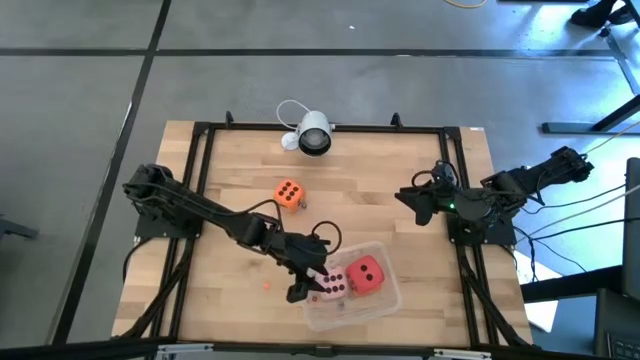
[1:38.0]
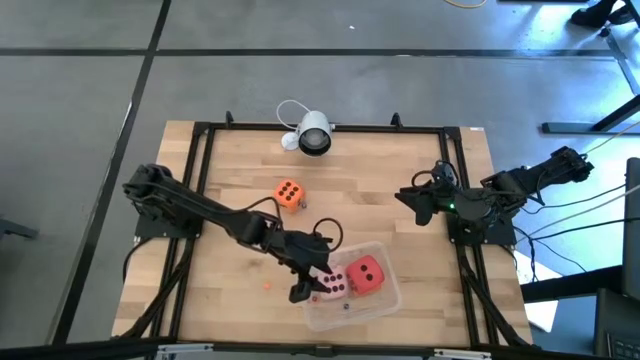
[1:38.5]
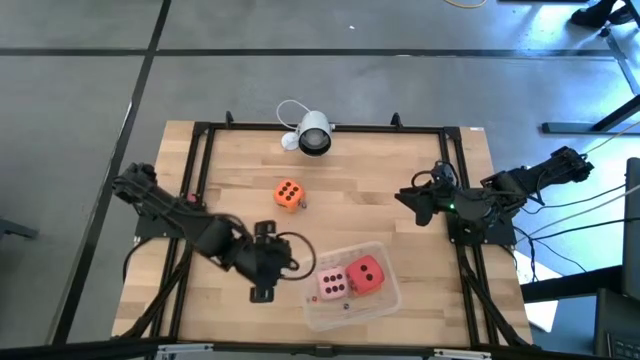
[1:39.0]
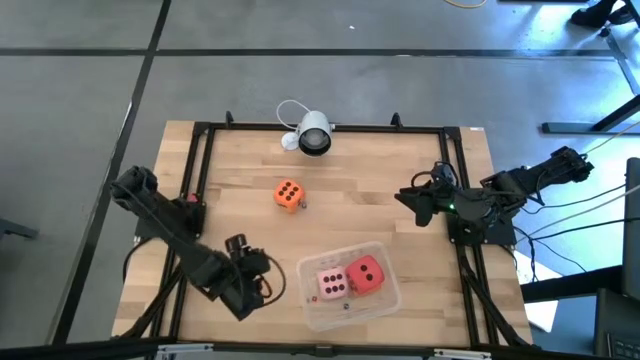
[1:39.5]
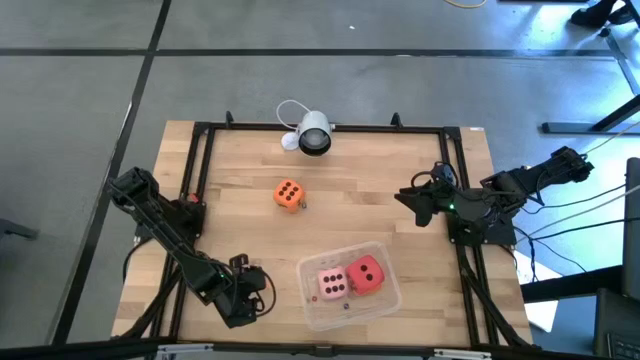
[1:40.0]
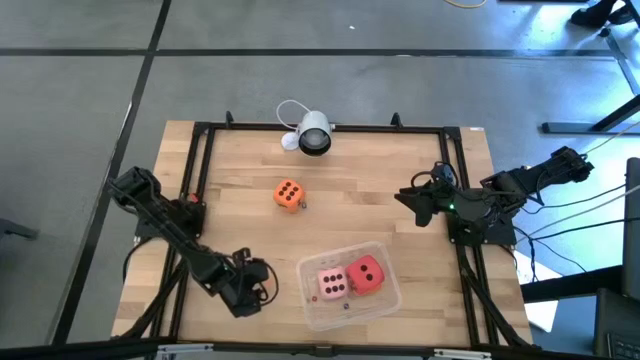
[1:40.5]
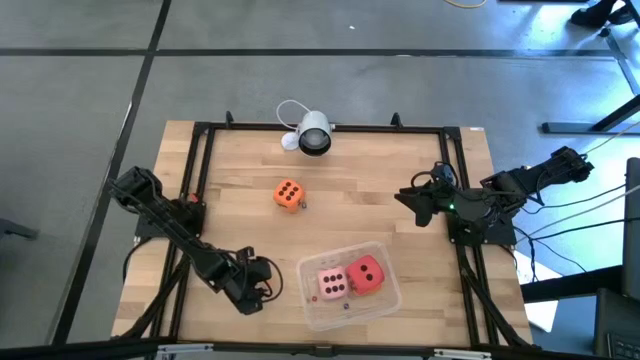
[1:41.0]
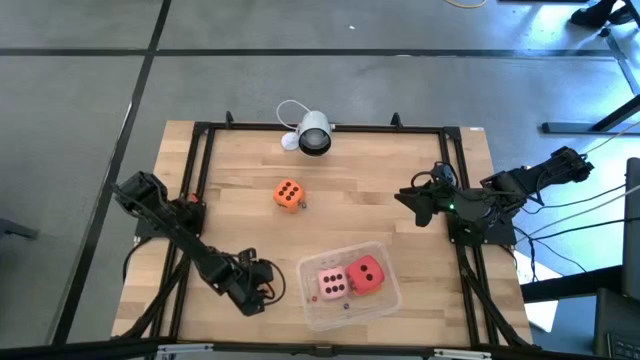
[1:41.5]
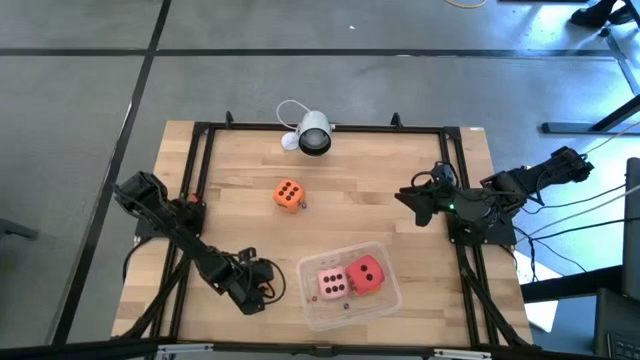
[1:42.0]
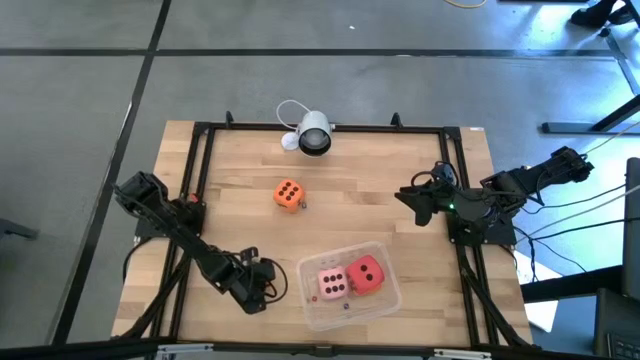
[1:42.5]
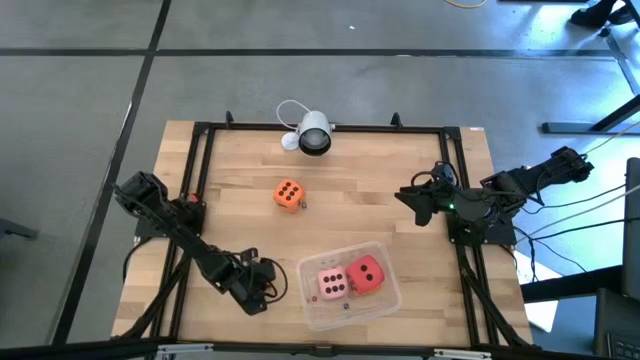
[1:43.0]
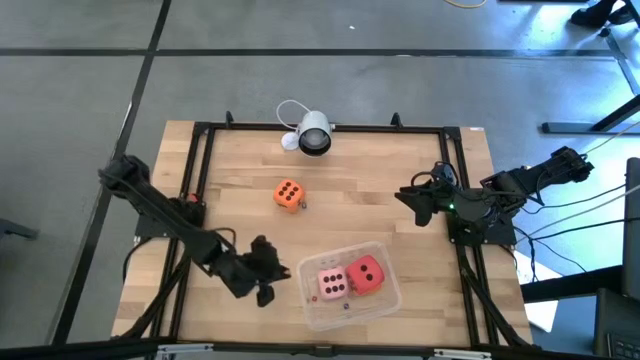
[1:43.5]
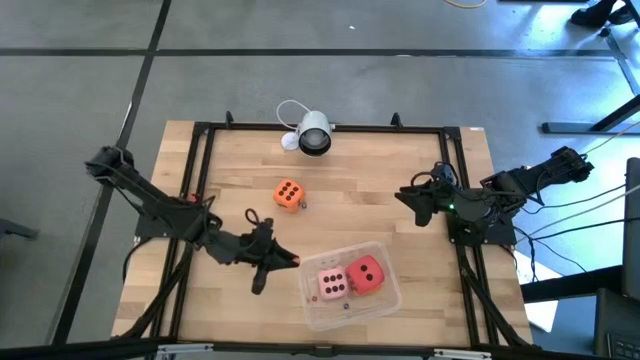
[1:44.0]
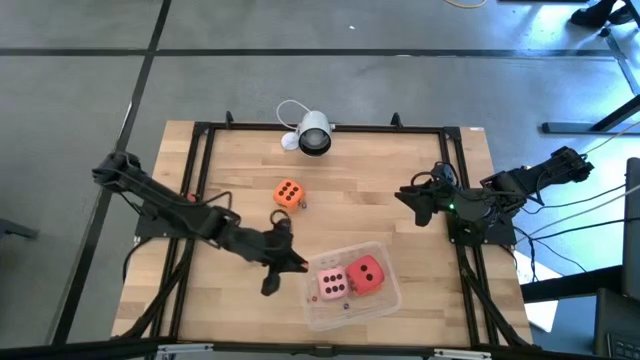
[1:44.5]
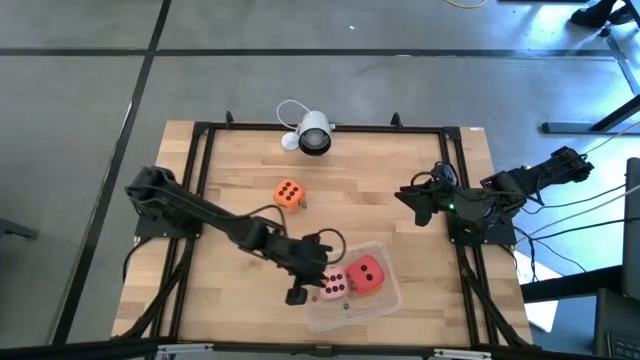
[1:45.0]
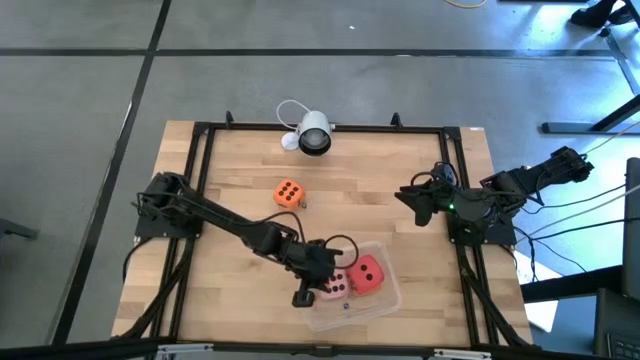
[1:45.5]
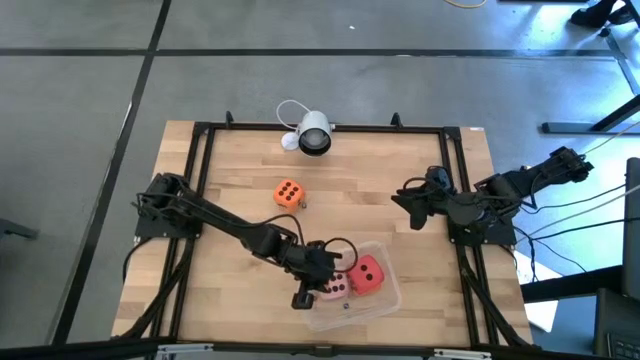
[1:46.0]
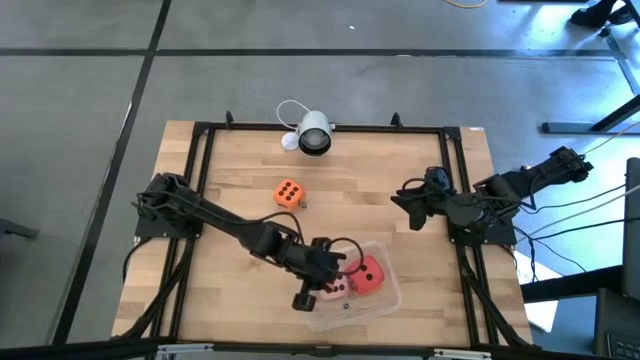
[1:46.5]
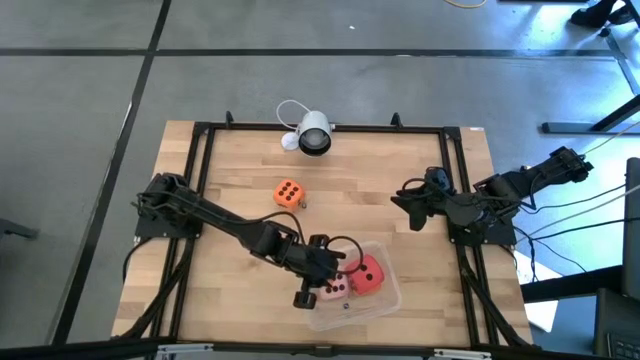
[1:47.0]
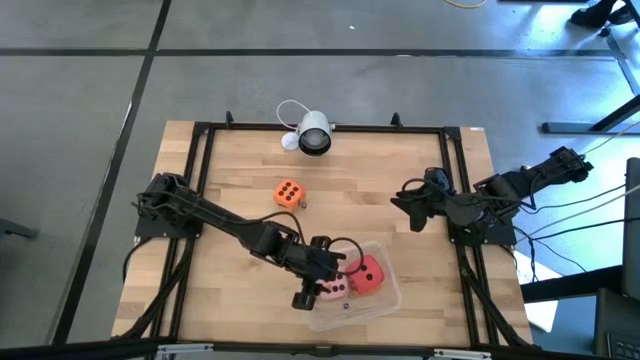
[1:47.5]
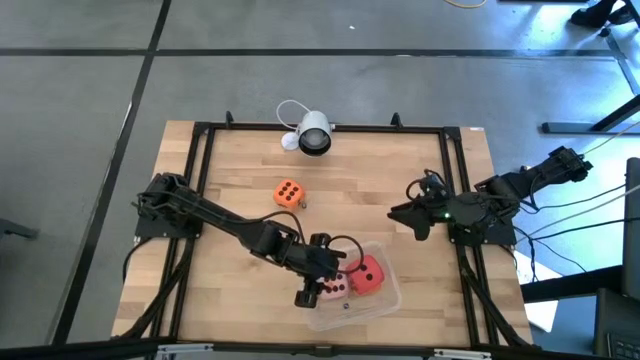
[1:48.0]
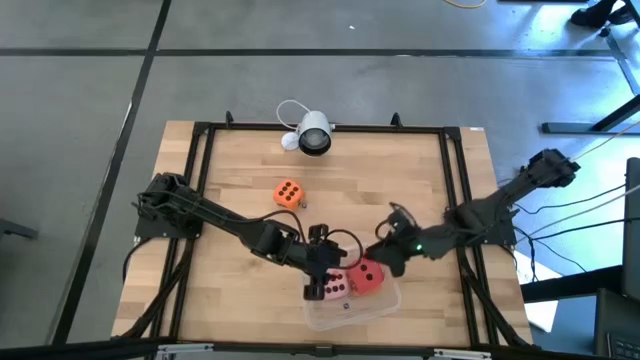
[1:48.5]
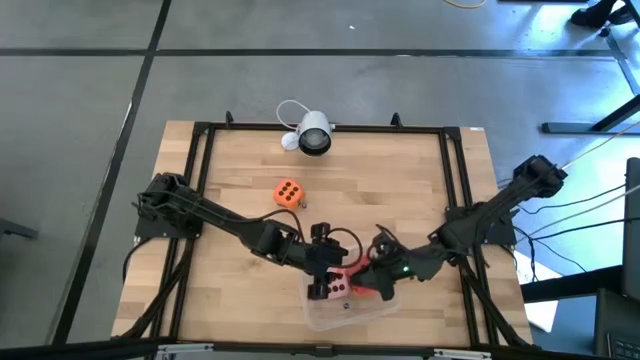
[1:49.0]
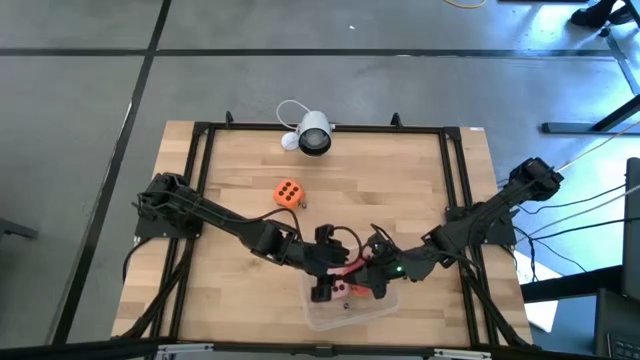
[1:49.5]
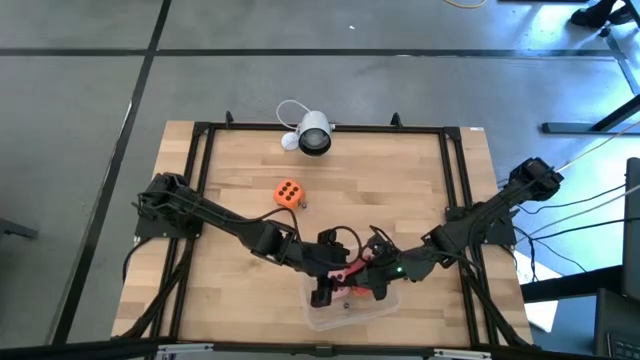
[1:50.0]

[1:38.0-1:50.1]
Task: Pick & Place Dice
Put the small orange die into the transparent bin

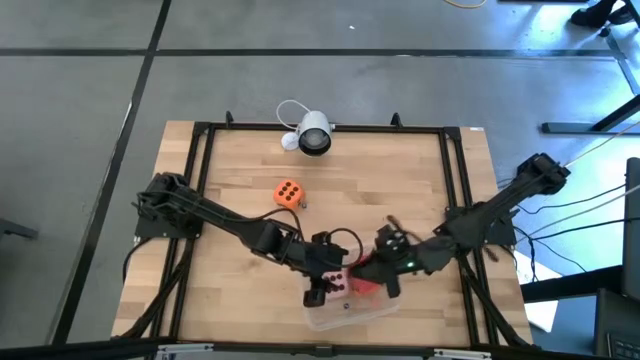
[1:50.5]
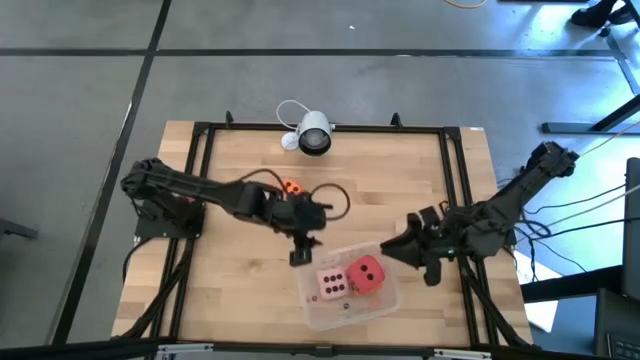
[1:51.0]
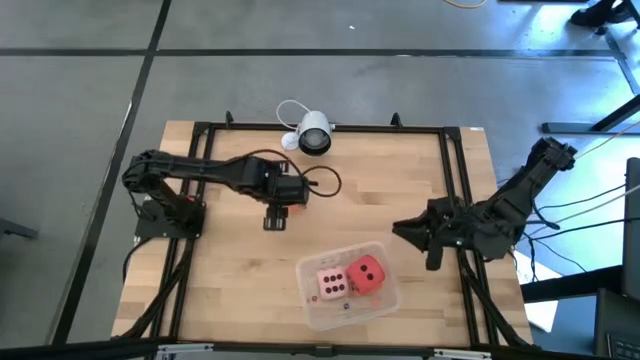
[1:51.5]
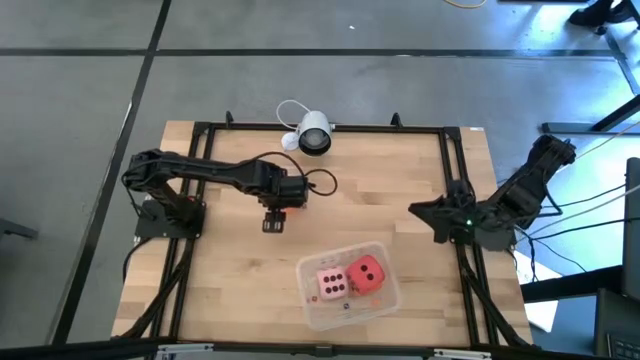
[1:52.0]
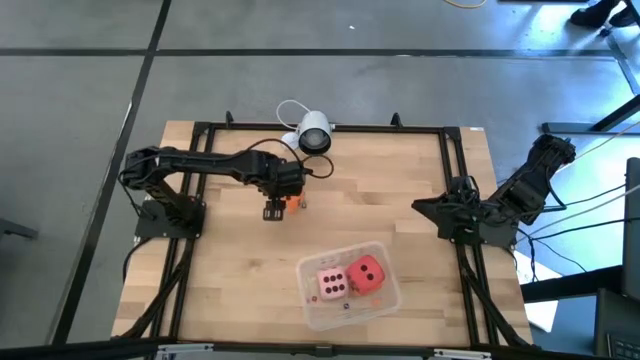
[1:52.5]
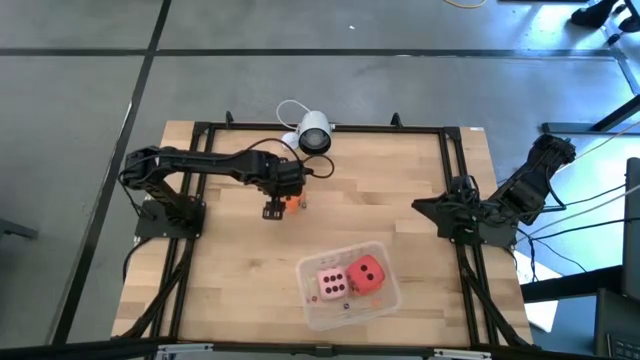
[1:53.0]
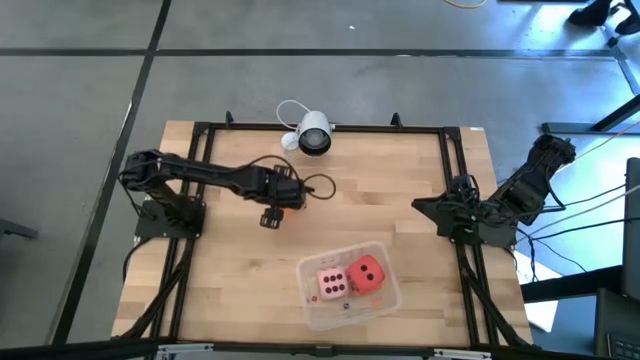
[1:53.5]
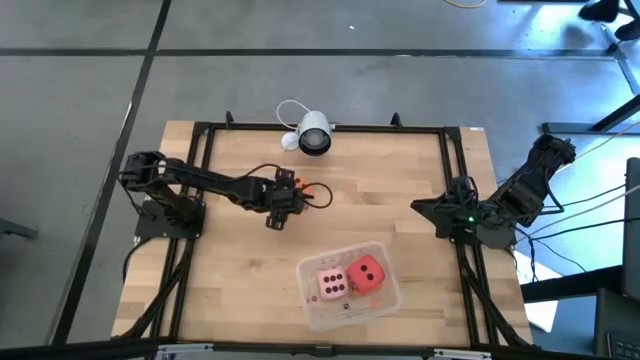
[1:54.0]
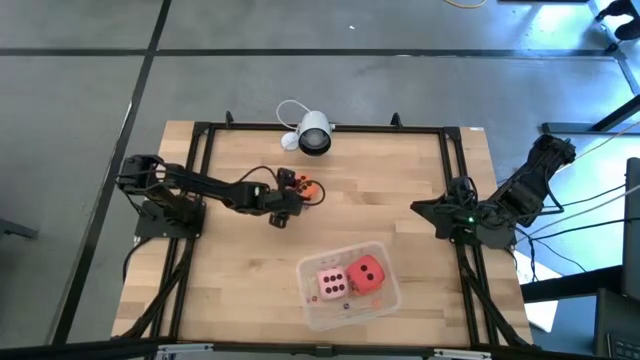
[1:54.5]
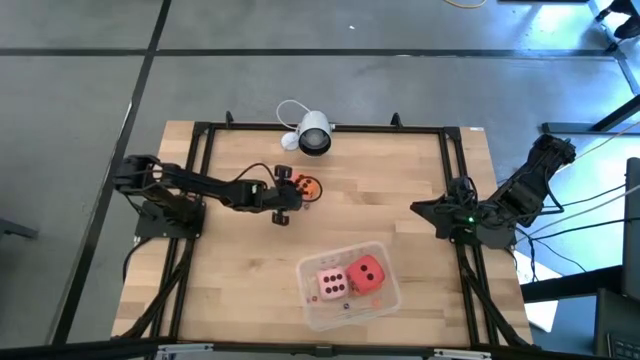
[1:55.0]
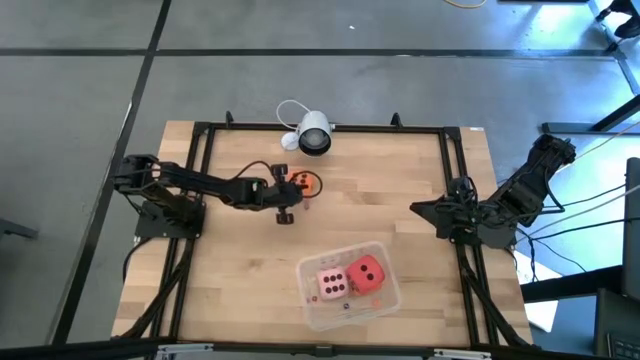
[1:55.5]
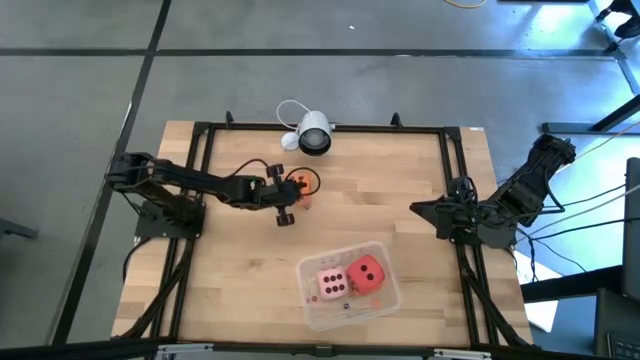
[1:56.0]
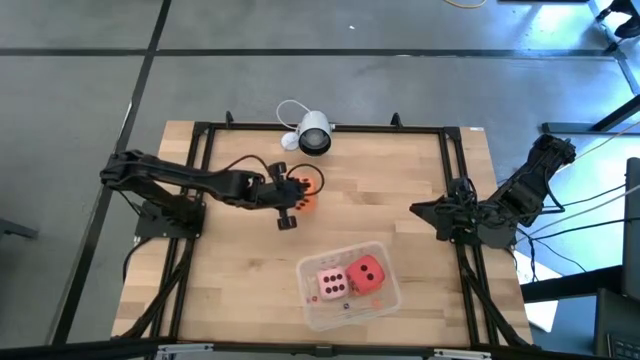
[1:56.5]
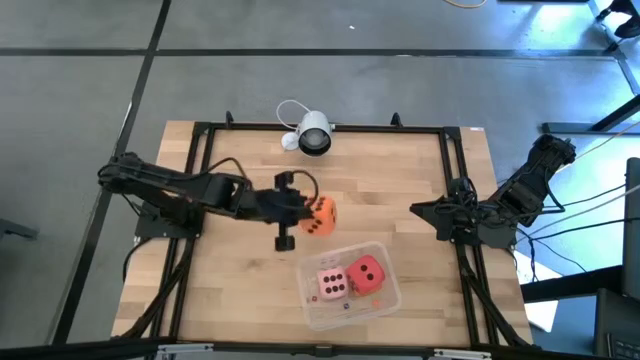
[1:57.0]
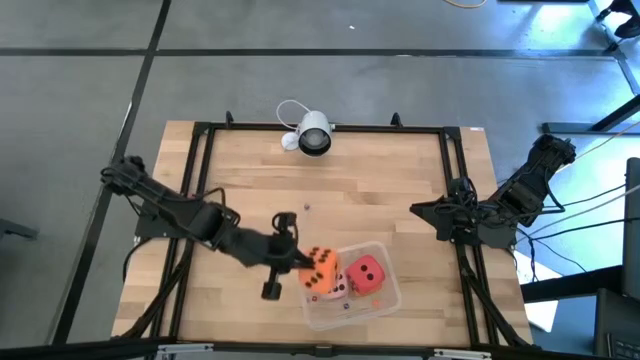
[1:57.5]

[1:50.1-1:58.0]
Put the large orange die into the transparent bin

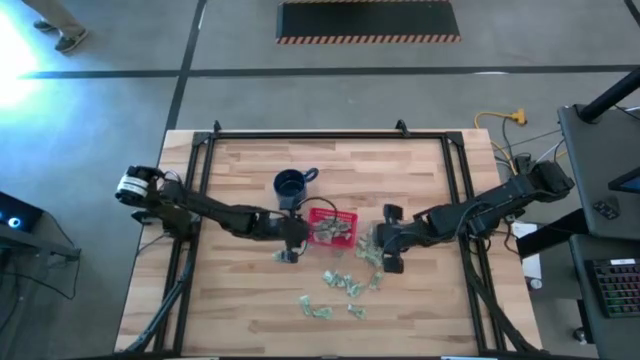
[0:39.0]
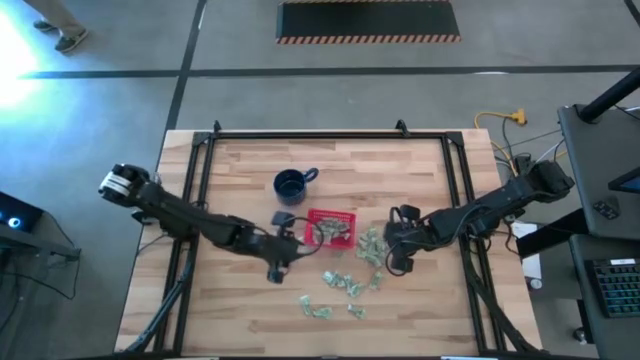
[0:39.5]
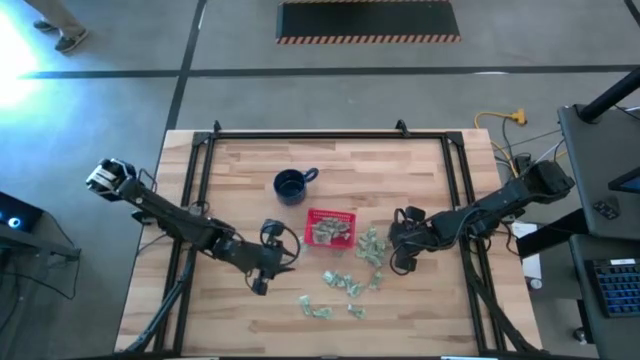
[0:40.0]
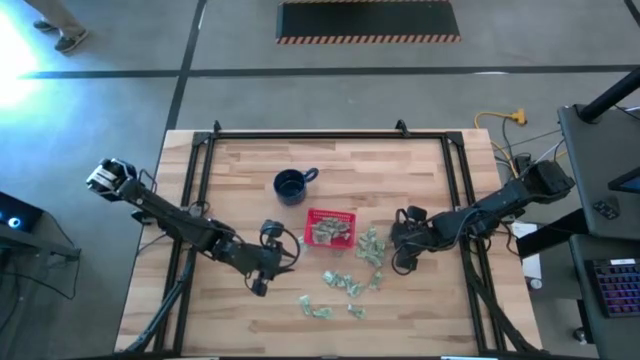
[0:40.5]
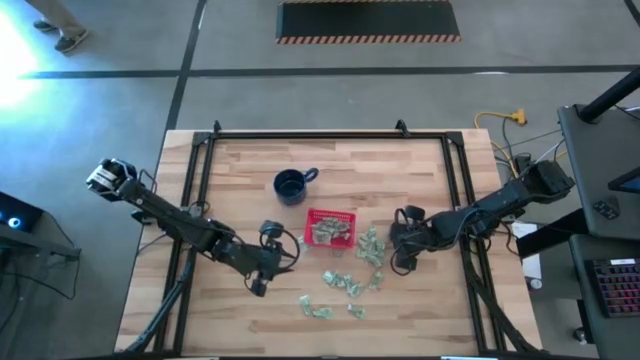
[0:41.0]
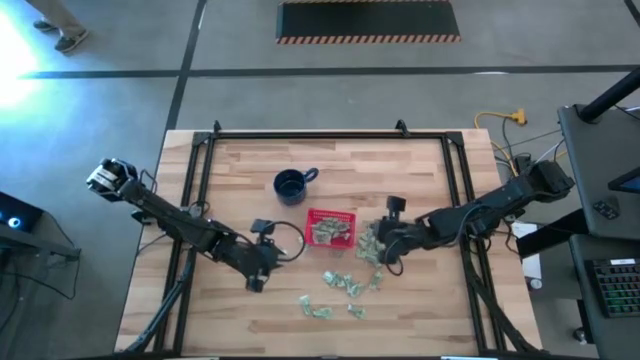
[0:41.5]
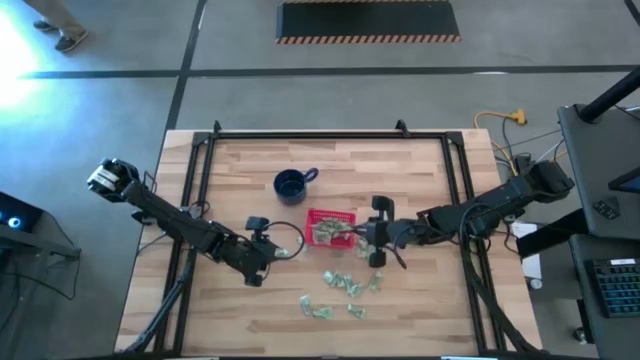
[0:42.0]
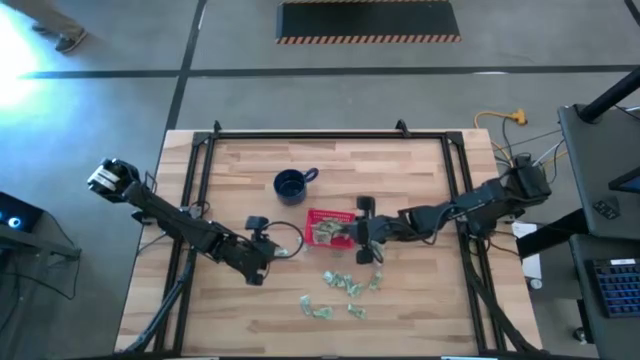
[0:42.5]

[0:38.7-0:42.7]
Task: Pick and place Stevia / Truvia into bins
Put the white stevia packet into the red basket
